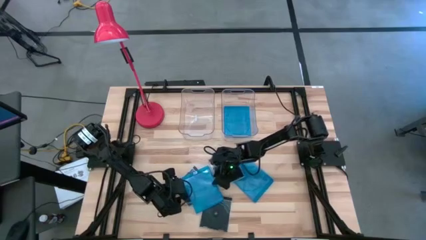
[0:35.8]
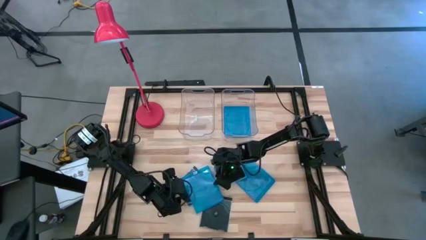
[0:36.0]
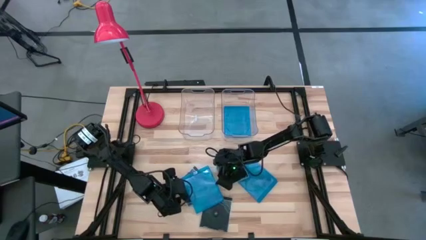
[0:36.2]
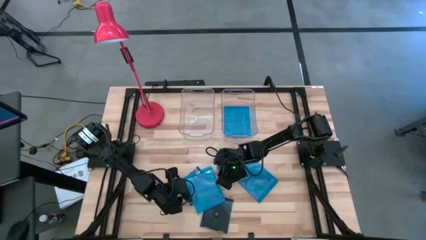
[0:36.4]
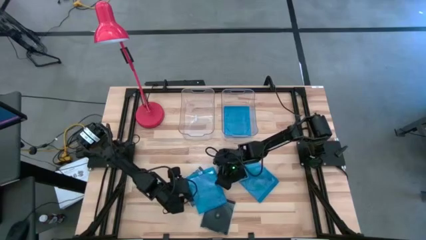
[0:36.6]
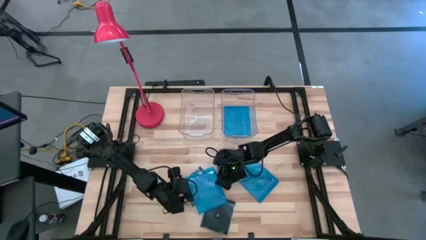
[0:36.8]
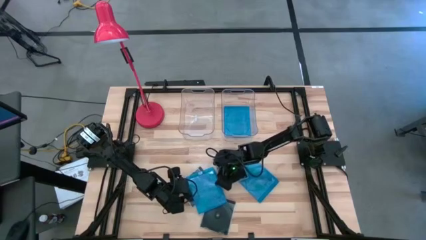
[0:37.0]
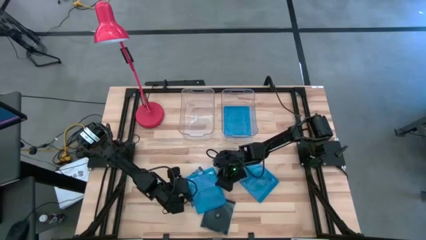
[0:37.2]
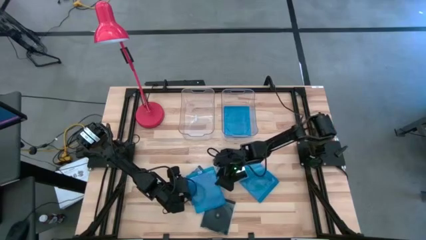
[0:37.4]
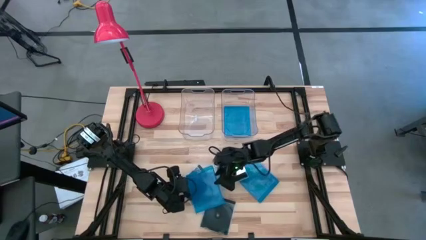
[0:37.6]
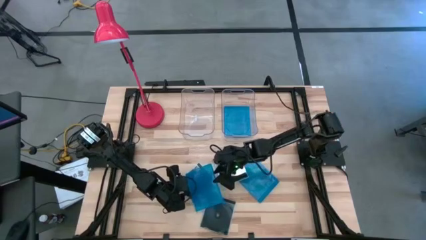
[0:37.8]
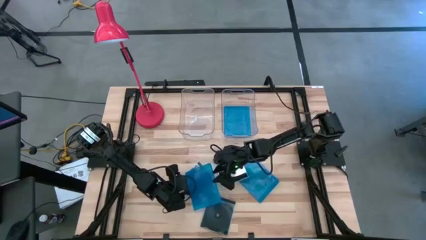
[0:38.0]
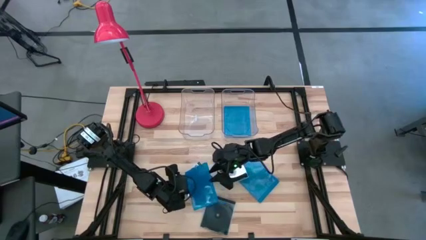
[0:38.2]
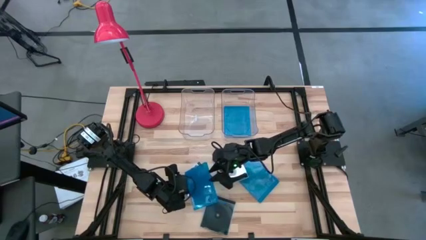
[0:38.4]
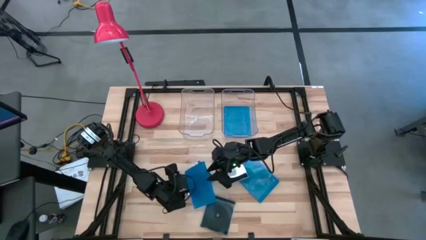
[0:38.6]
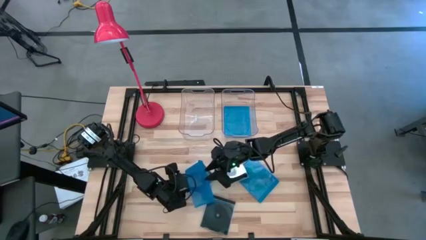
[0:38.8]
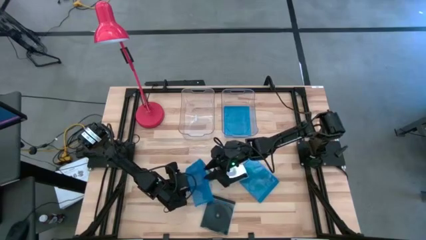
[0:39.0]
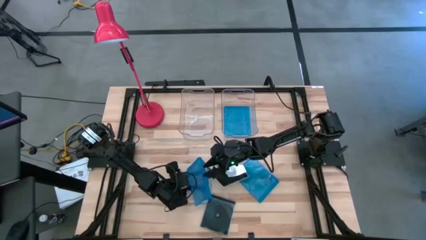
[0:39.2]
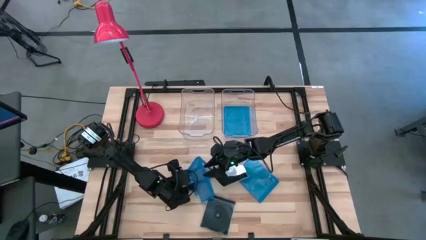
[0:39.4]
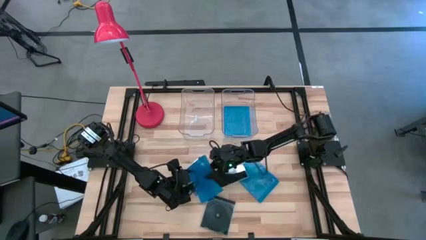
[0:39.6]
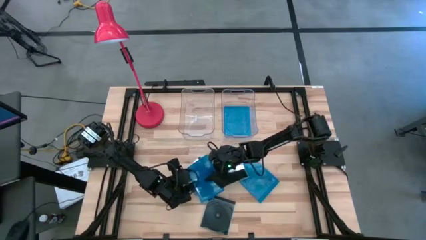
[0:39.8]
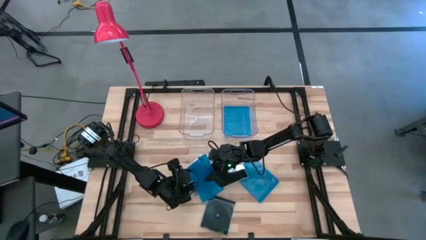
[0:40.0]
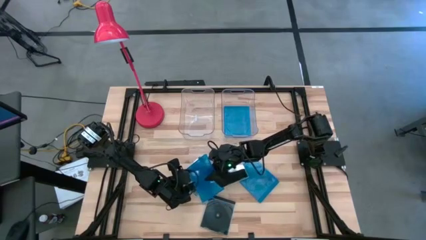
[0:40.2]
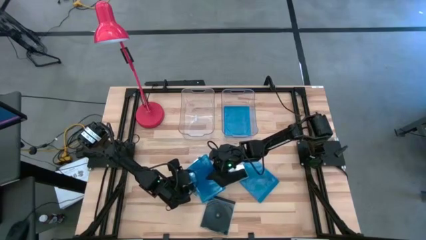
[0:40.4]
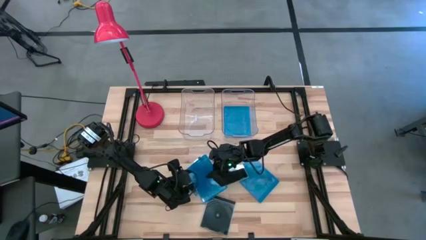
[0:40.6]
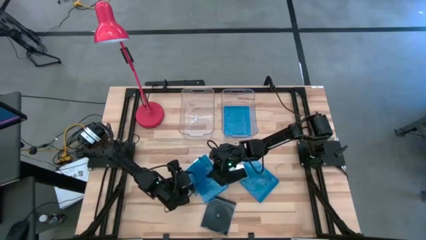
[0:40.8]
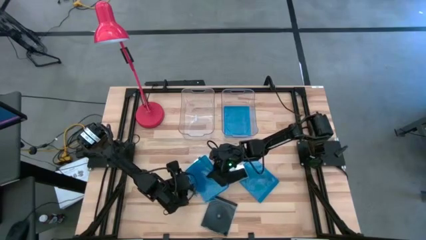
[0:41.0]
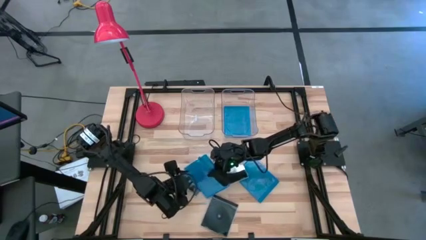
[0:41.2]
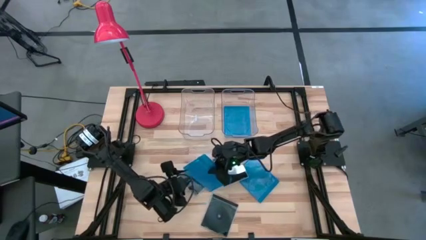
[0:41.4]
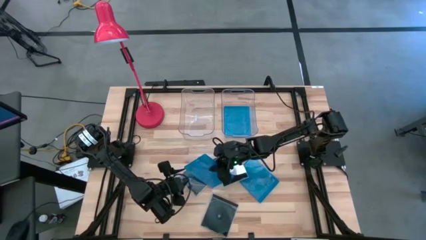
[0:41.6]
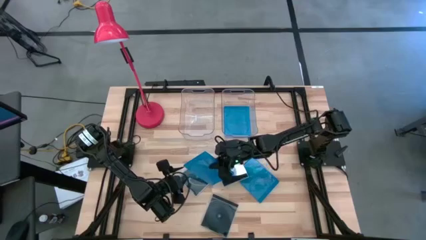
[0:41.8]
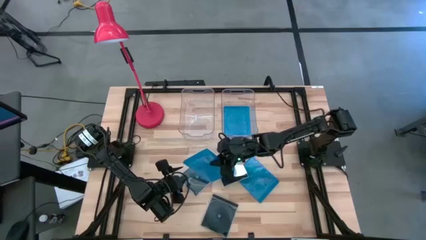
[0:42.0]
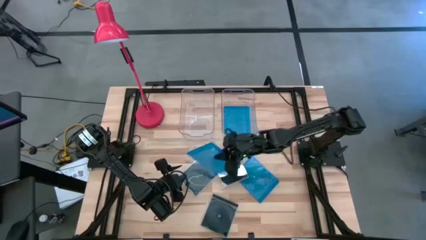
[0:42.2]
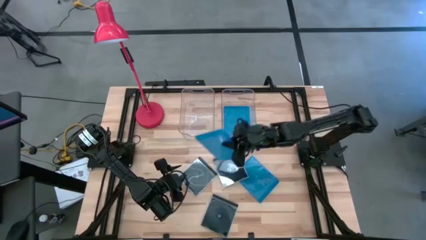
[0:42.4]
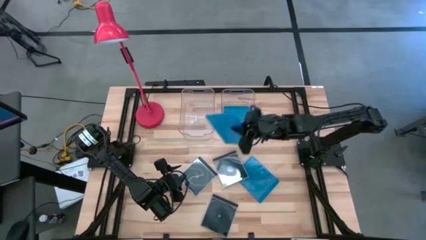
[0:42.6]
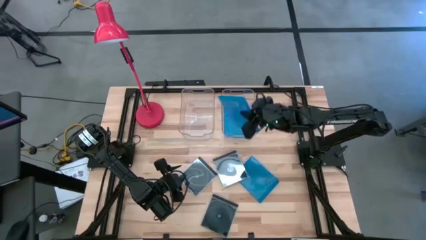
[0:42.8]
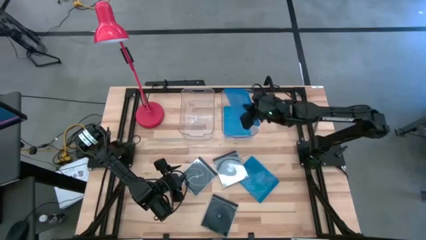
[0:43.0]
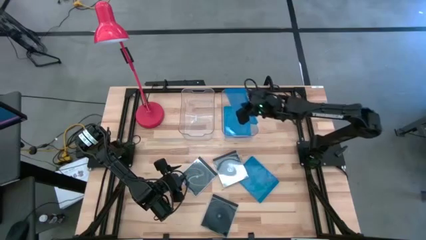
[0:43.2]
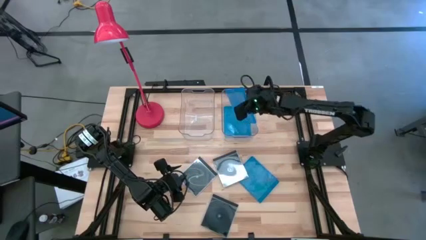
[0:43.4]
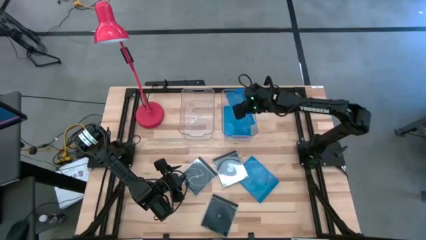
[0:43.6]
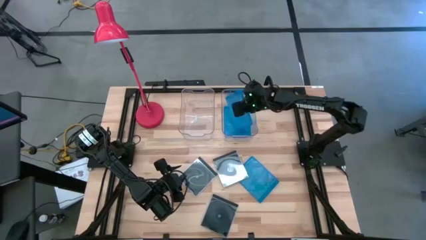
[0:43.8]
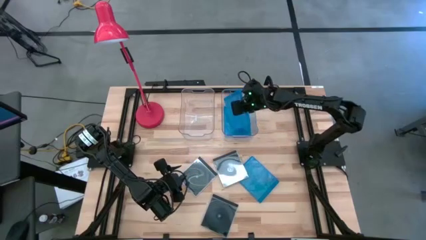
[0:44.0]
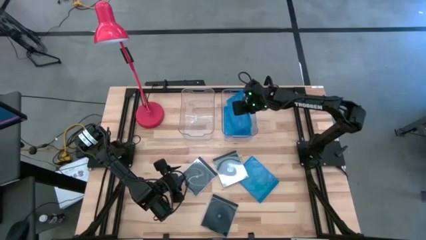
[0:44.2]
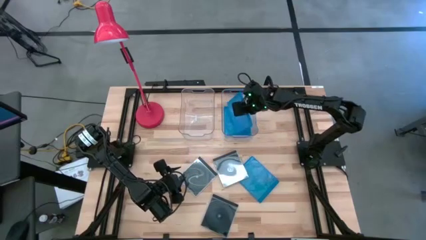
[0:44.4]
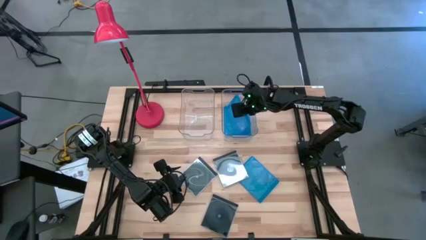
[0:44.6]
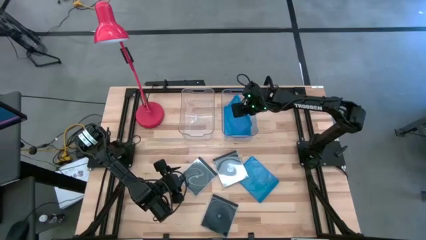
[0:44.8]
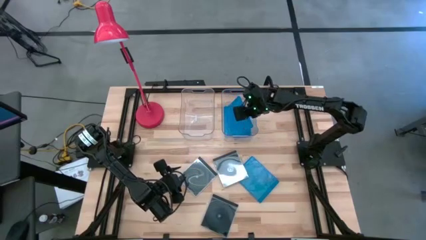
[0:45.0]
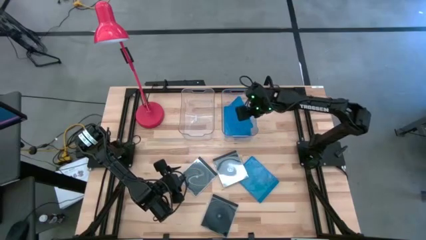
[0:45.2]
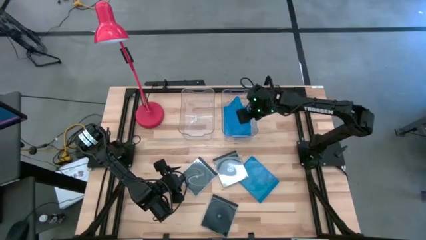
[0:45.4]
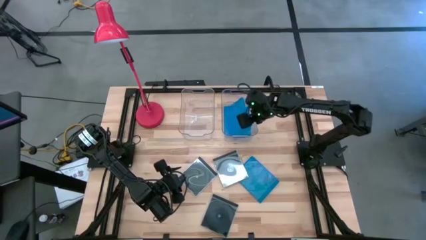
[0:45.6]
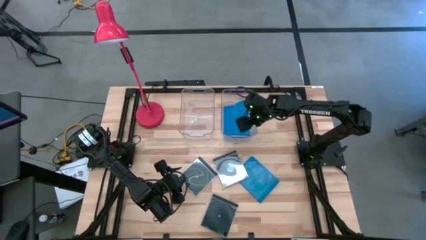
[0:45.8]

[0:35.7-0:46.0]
Task: Pick & place jewel cases by type
Put the left blue cd case into the right transparent bin

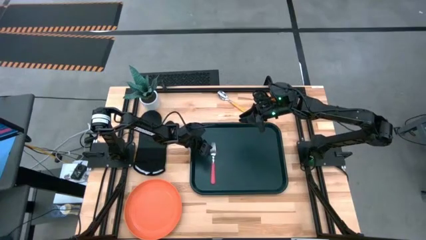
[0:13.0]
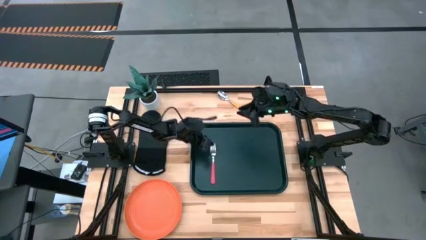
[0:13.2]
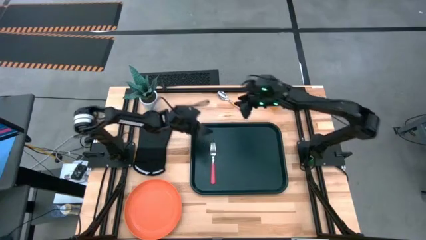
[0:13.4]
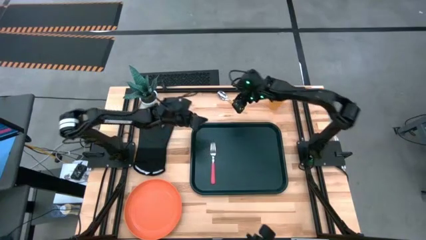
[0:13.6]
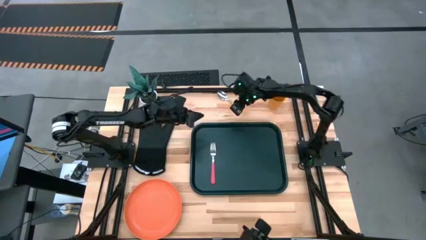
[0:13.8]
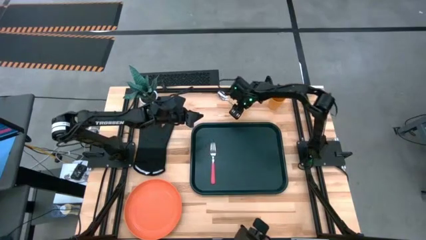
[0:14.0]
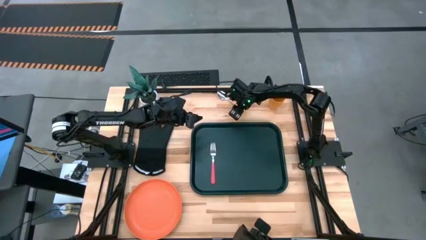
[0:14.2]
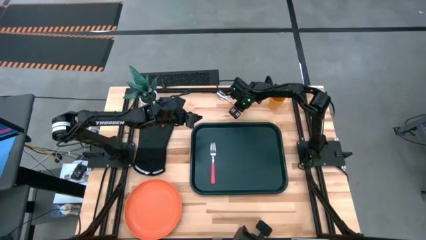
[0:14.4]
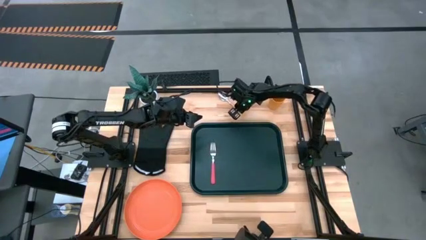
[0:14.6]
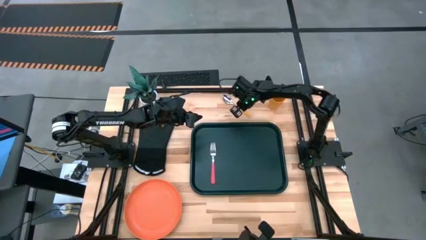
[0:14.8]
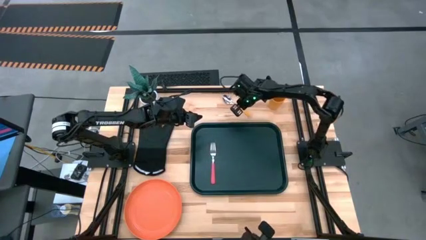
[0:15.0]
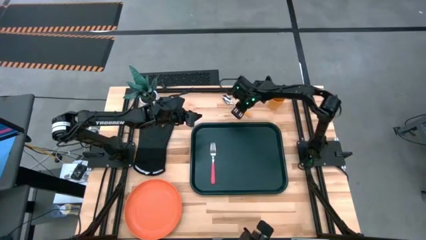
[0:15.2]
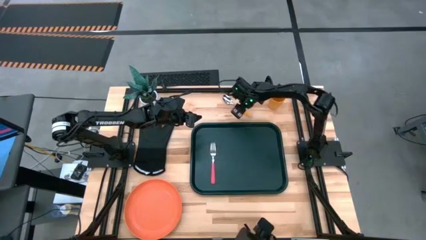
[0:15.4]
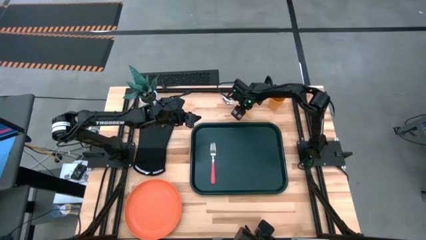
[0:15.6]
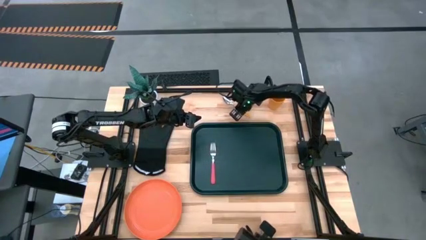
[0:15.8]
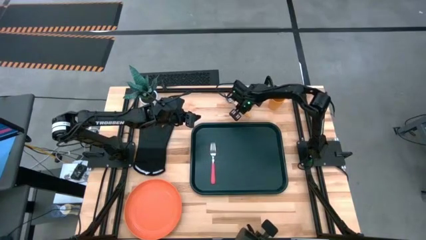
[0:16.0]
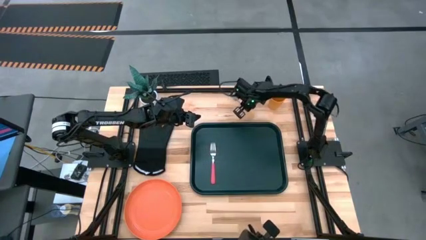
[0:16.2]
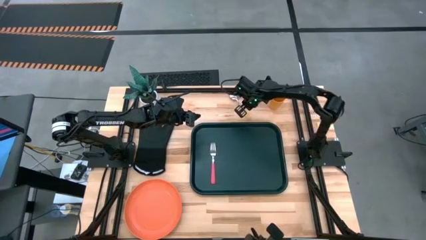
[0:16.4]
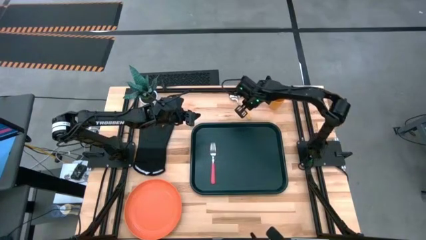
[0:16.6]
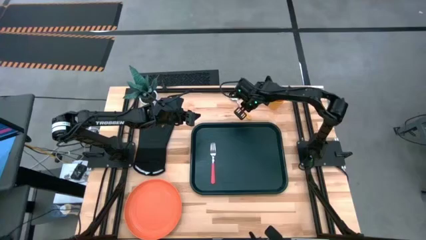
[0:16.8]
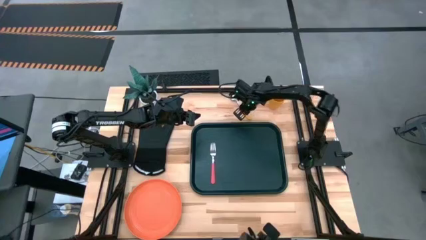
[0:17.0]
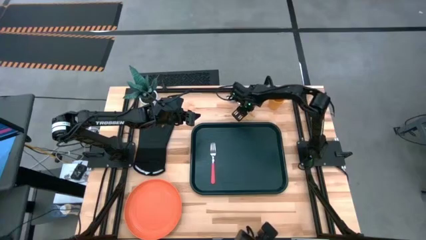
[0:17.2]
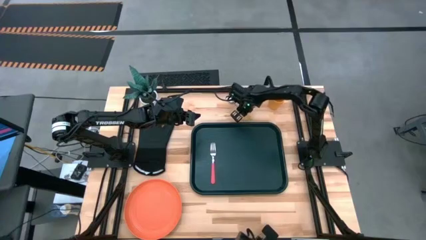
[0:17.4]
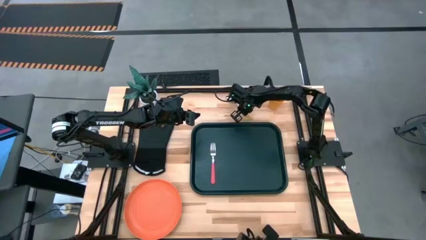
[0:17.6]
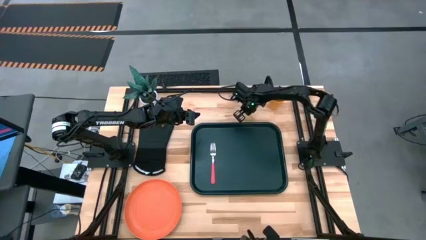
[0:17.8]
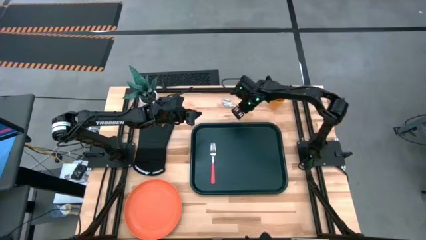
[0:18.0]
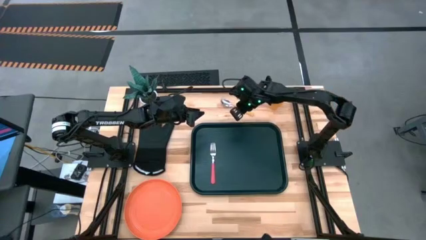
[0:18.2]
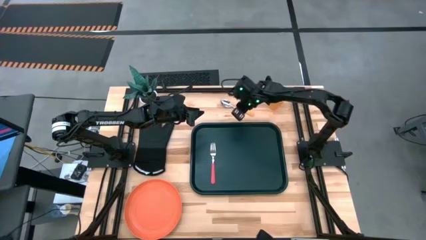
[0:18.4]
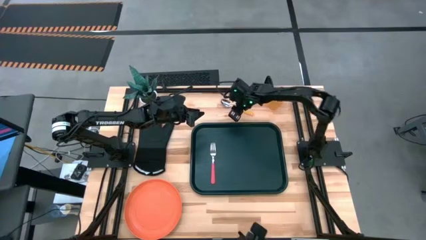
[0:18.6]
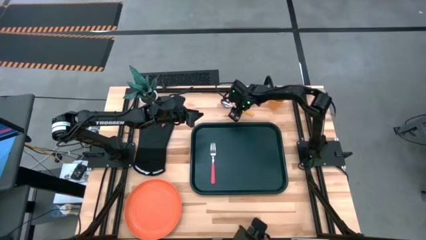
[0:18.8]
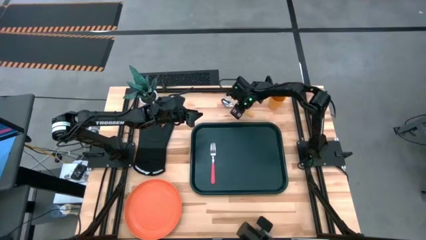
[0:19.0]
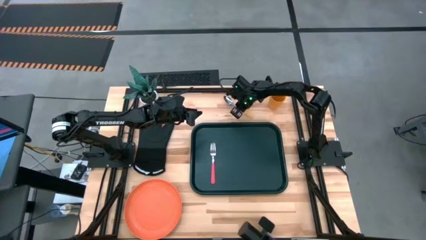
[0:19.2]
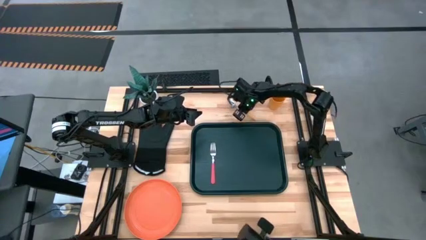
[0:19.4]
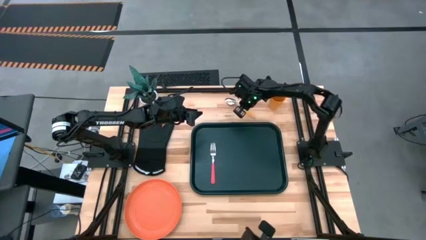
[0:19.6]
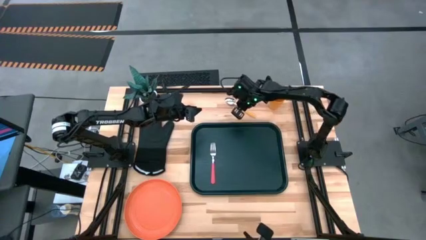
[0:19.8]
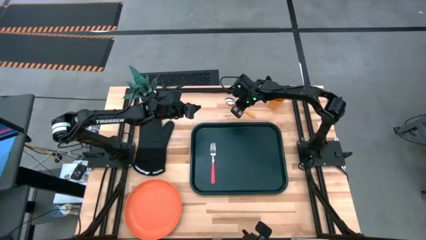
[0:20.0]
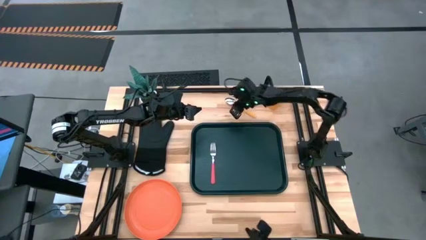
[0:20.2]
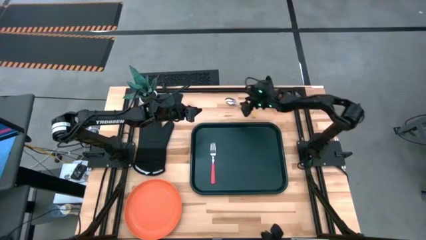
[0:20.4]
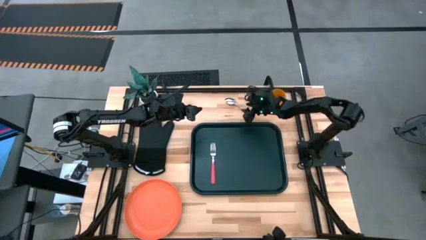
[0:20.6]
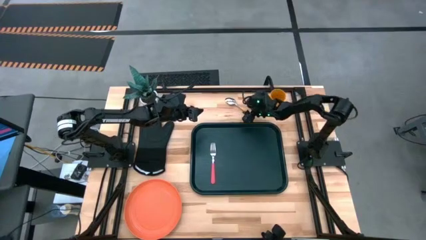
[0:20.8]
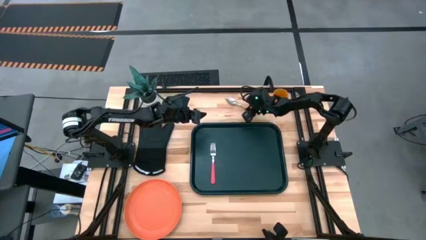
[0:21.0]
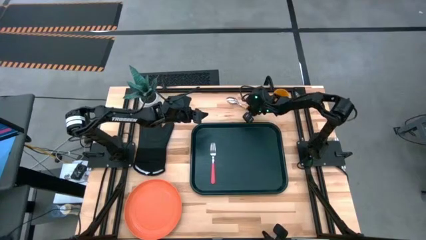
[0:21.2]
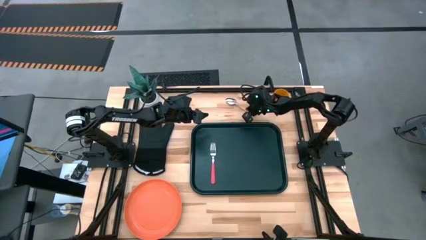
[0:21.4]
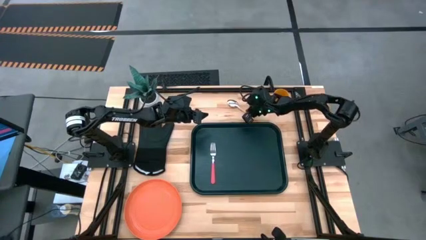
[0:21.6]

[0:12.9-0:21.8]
Task: Pick and place plate/cup/fork/spoon on tray
Put the yellow spoon to the left of the pink fork on the black tray
